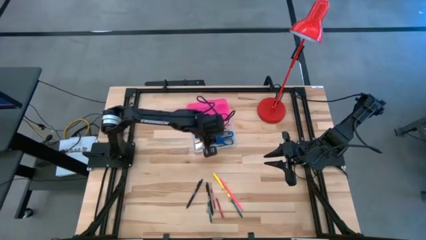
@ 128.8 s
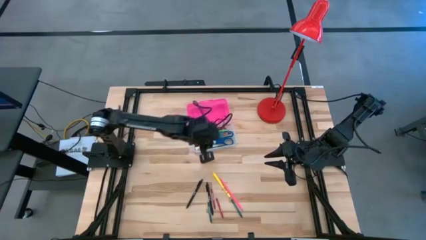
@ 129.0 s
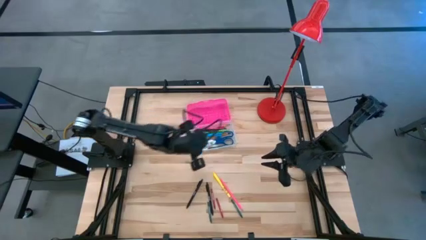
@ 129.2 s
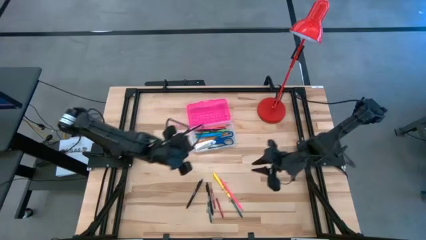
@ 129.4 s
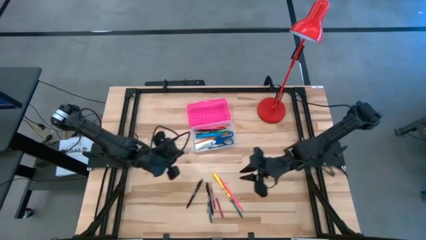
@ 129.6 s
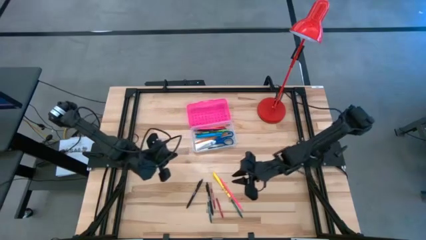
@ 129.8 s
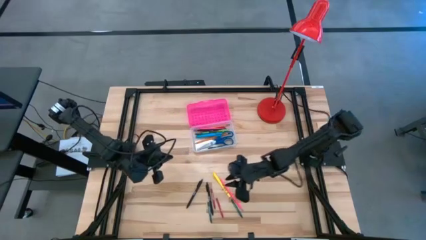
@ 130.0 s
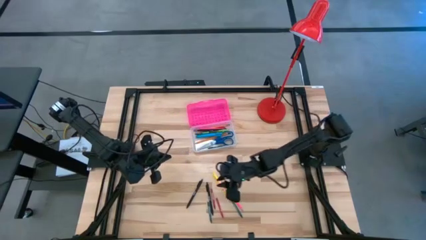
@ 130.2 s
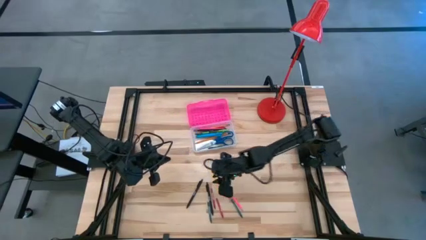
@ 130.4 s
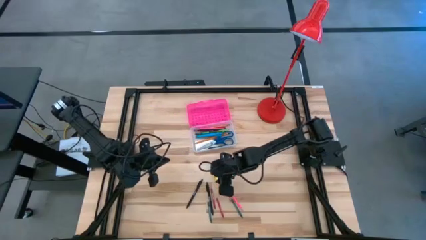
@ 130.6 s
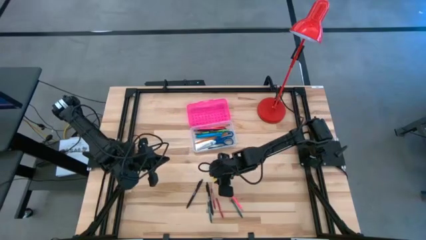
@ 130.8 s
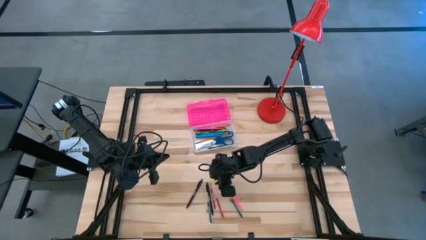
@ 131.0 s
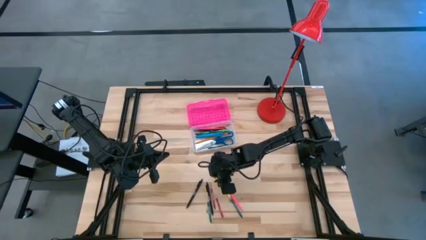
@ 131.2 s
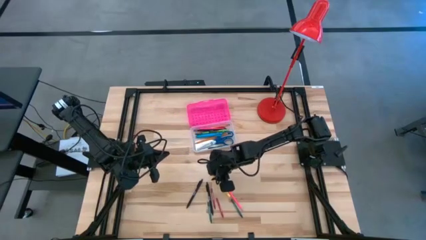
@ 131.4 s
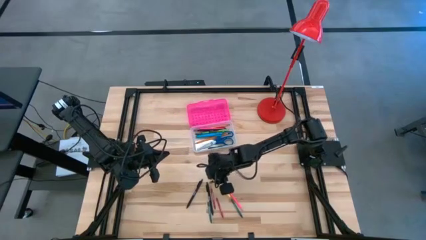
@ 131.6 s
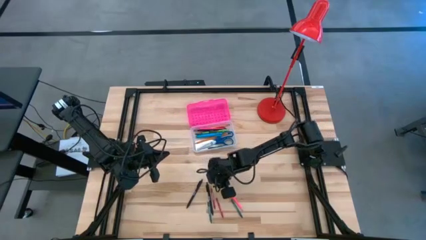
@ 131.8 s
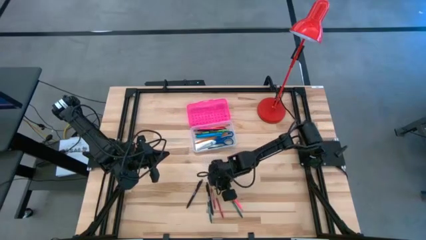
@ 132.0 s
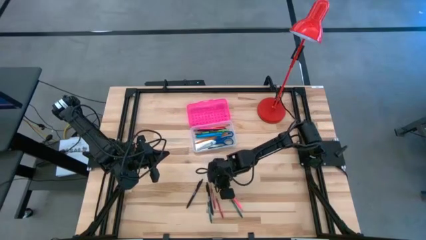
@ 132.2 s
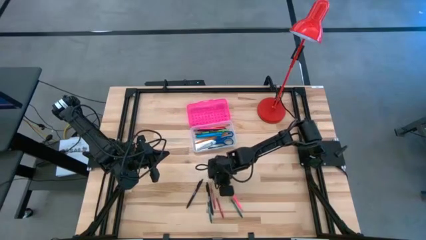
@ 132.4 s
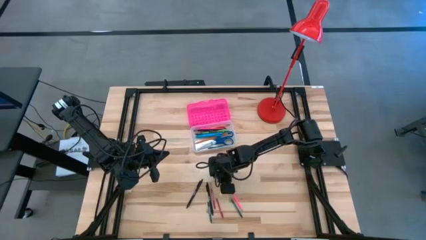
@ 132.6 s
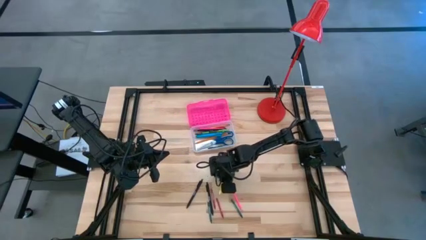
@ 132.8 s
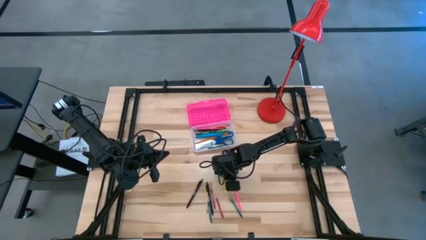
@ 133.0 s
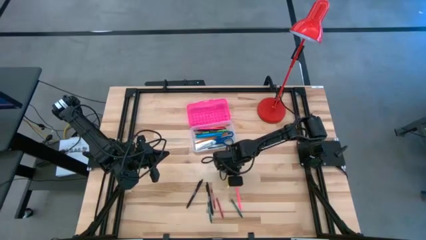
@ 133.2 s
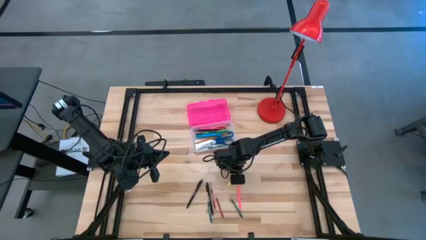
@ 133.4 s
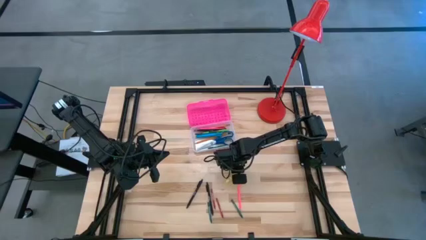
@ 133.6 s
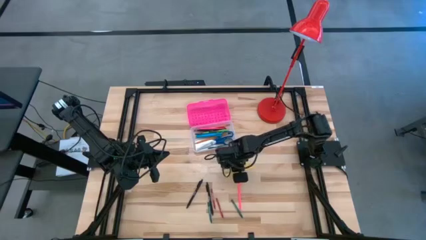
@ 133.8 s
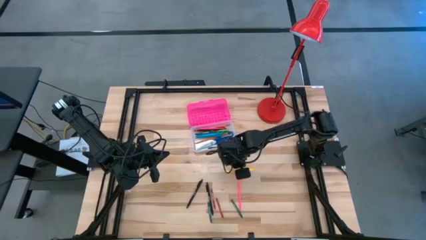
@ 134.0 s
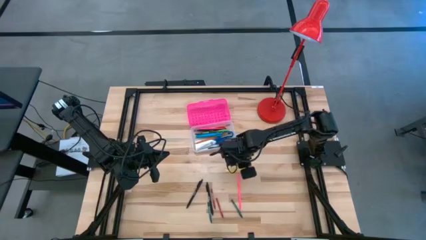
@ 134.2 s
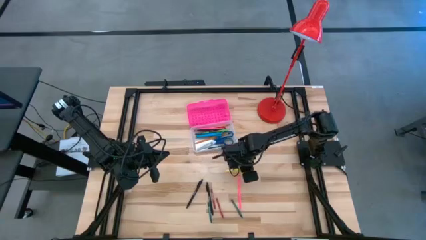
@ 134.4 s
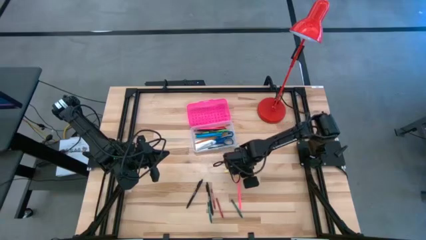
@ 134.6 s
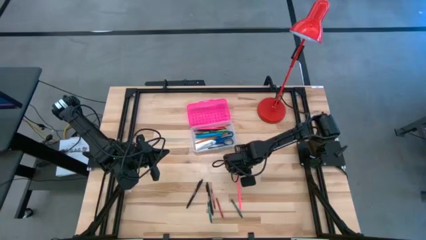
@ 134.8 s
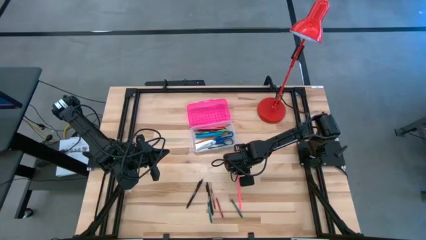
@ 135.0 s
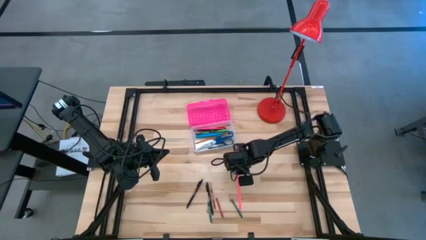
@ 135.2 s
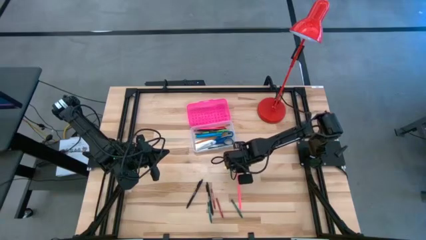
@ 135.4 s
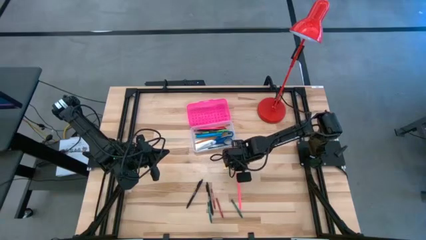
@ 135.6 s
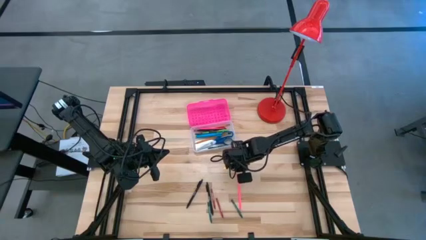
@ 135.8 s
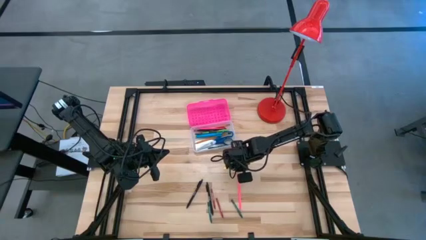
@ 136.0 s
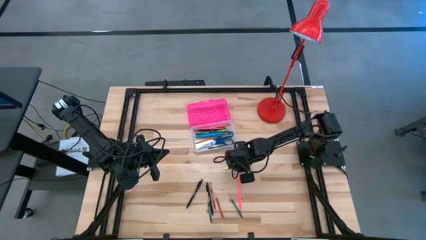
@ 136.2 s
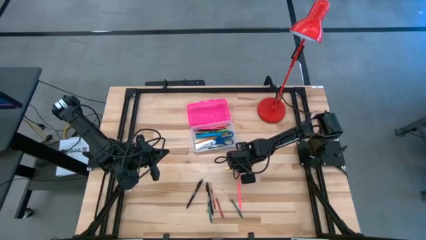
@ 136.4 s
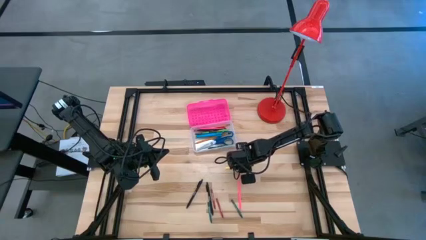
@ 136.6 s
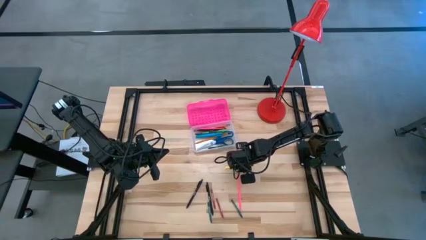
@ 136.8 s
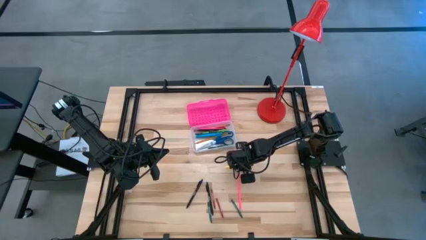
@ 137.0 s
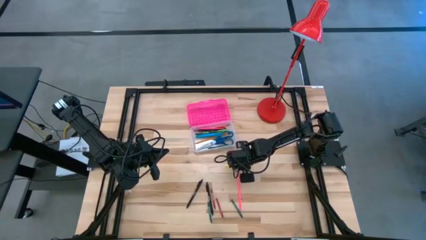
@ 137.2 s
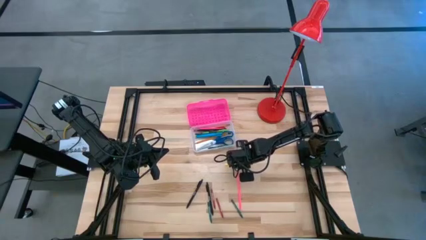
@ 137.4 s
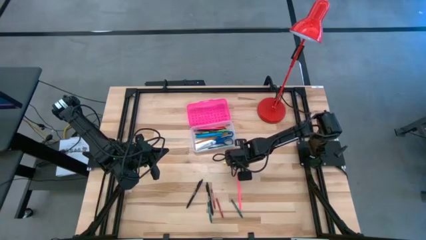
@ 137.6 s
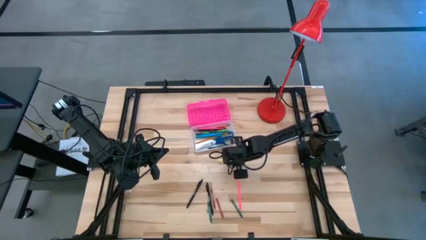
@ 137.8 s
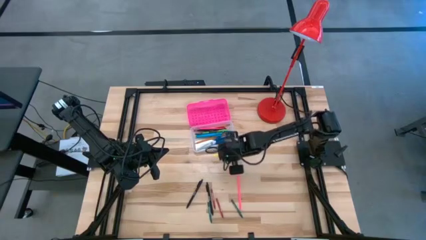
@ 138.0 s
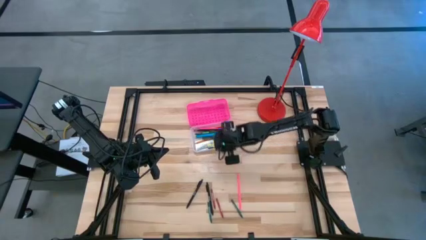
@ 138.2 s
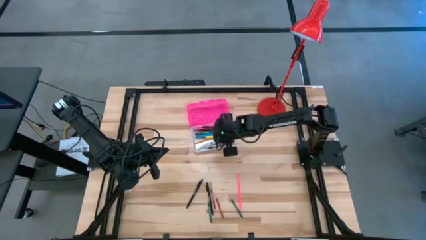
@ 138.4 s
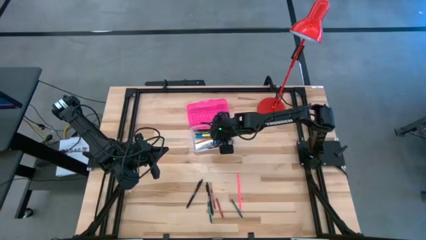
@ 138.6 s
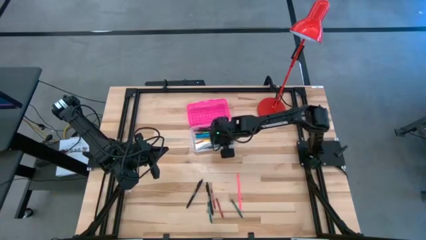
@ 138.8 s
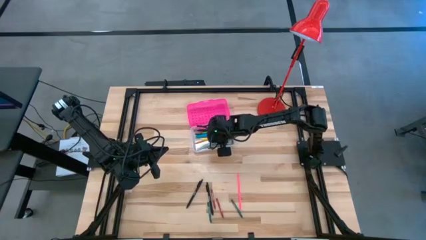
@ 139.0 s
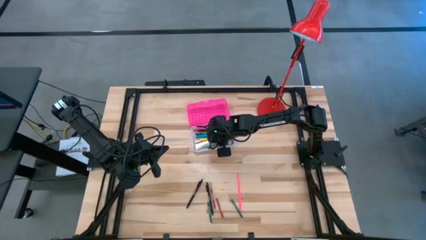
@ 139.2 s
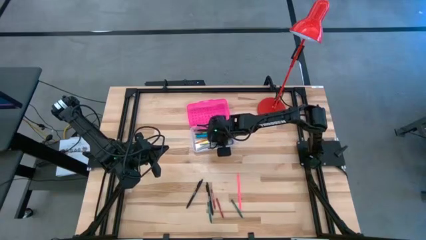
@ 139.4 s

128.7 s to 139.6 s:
Task: Pick & place school supplies into a supply box
Put the yellow pen into the pink supply box

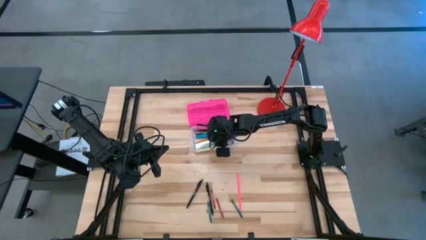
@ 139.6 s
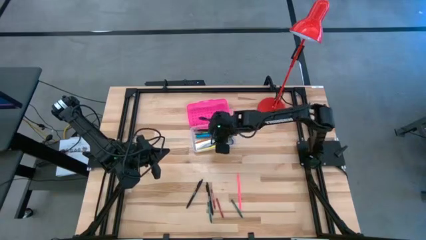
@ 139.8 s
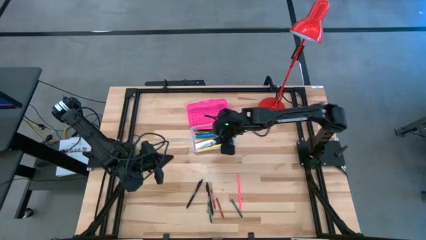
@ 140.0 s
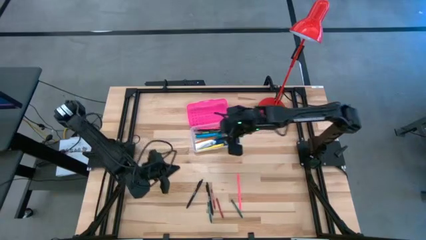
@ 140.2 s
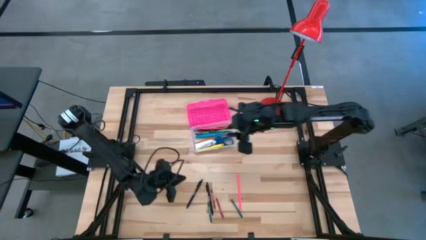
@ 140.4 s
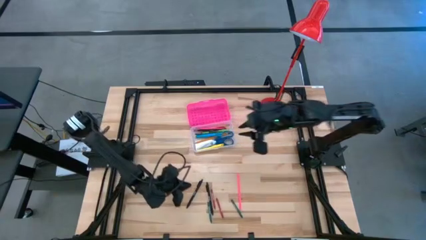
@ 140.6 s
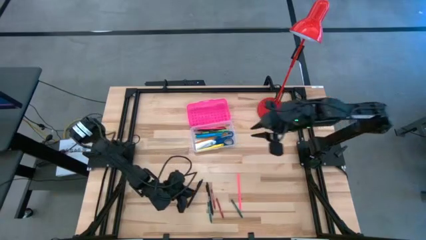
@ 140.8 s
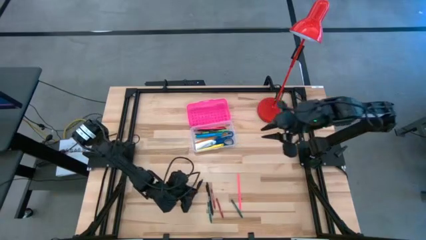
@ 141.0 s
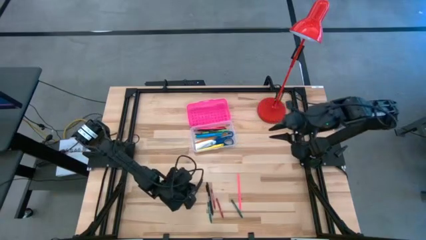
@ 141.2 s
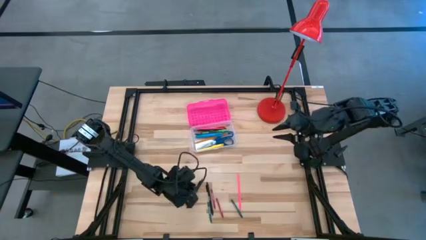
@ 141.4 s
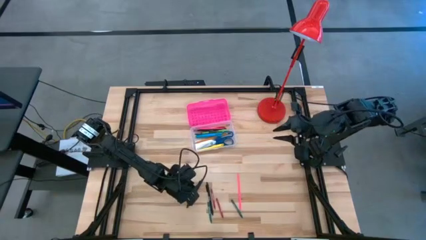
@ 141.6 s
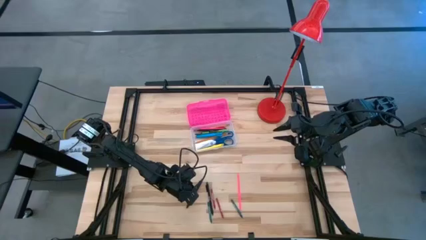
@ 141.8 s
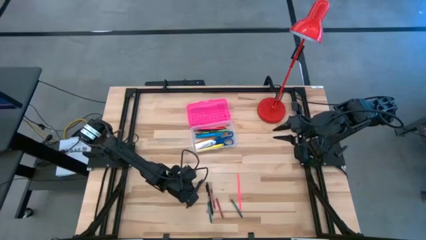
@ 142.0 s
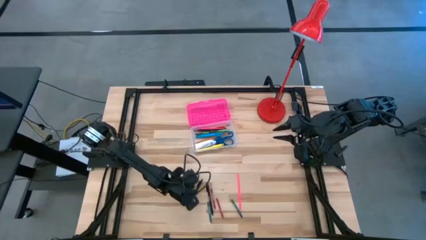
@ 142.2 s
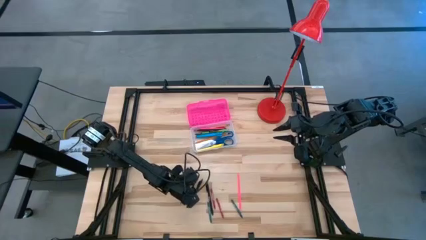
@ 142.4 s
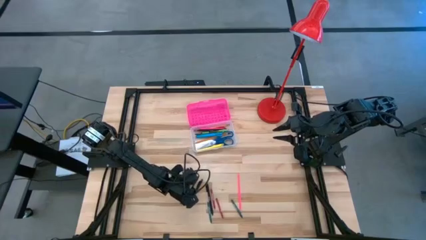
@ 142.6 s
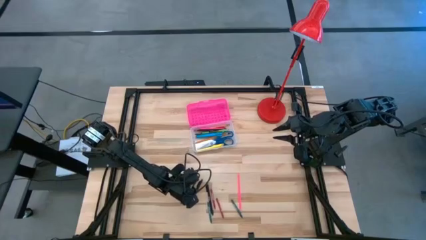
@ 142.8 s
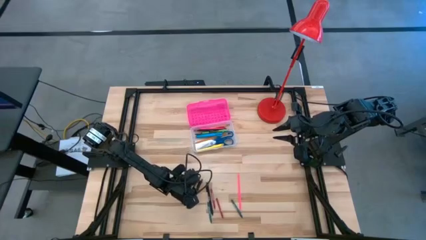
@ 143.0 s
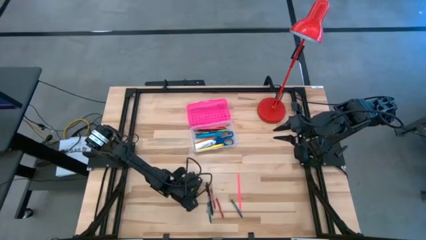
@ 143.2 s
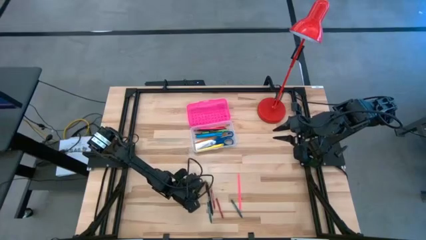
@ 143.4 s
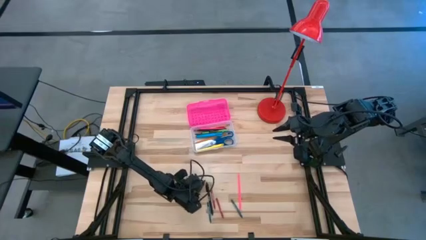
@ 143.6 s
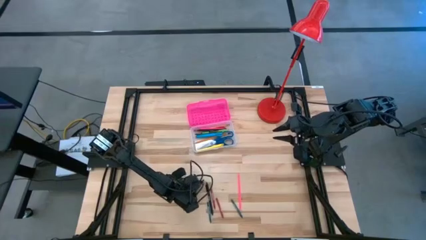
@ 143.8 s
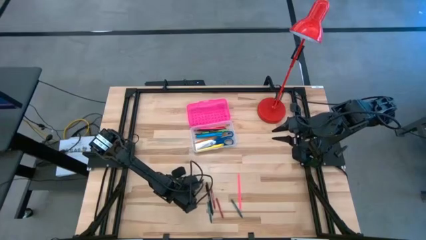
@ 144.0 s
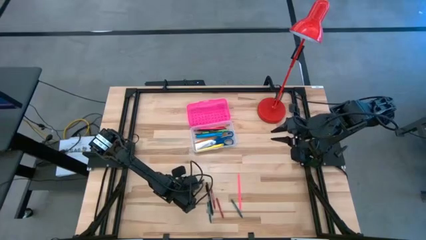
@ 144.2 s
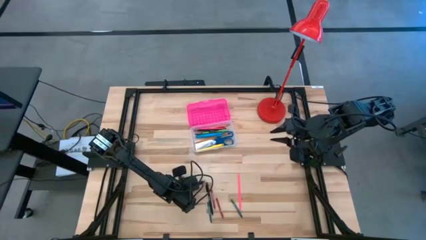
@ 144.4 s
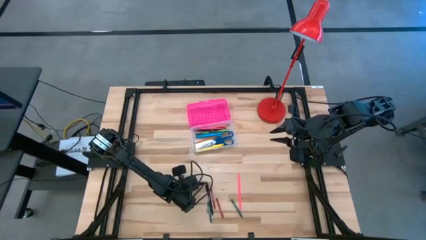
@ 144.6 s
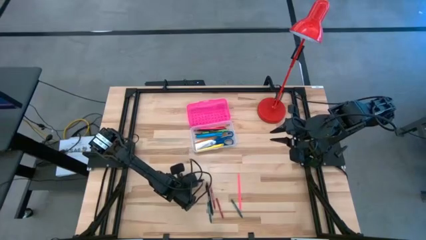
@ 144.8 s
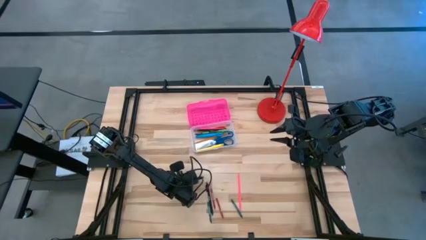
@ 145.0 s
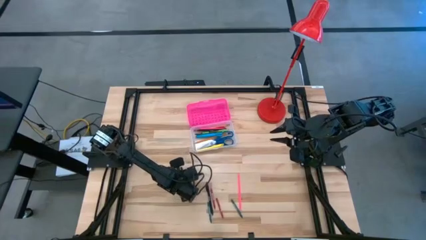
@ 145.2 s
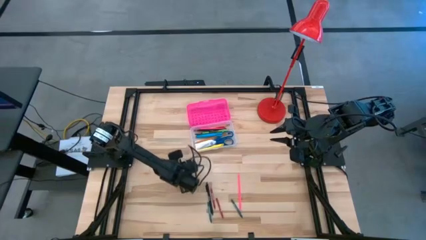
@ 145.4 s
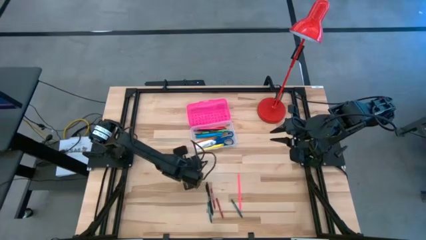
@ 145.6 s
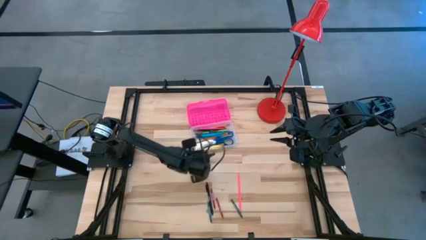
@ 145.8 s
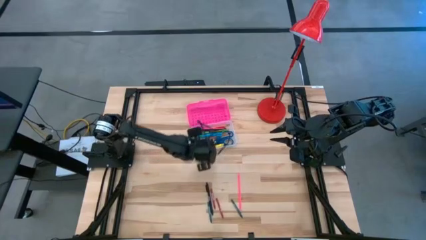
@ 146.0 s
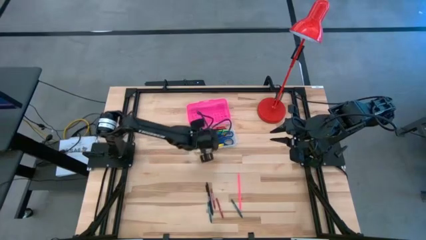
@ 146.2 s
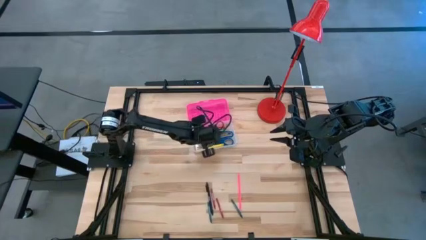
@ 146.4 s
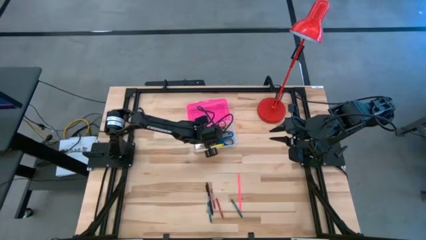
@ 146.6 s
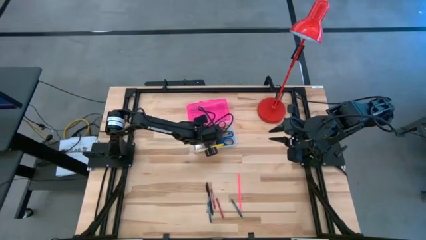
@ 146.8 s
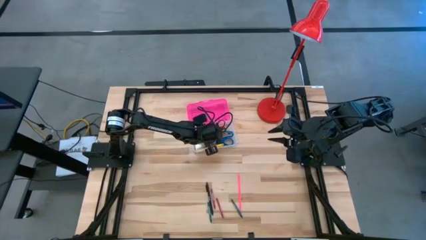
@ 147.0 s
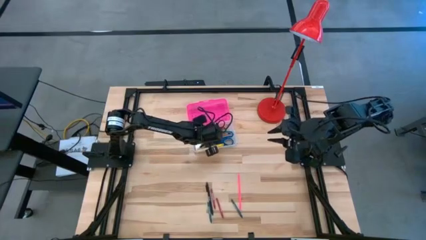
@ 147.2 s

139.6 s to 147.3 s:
Put the black pen into the pink supply box
